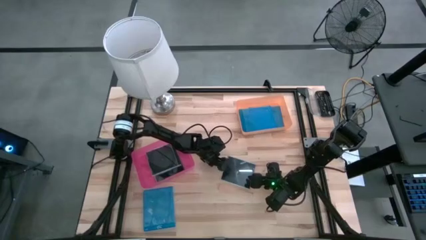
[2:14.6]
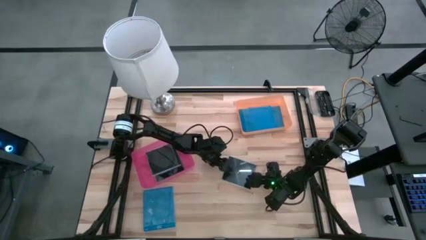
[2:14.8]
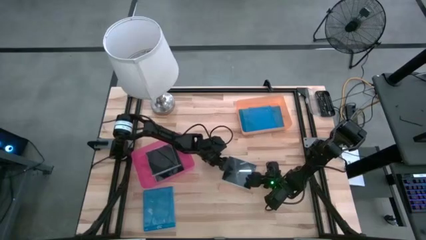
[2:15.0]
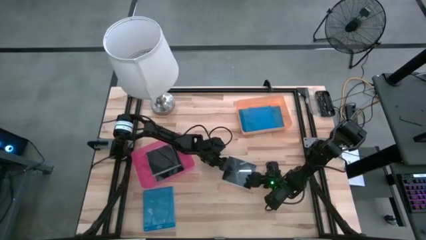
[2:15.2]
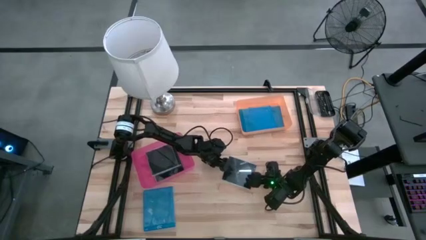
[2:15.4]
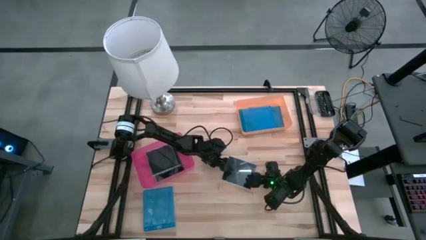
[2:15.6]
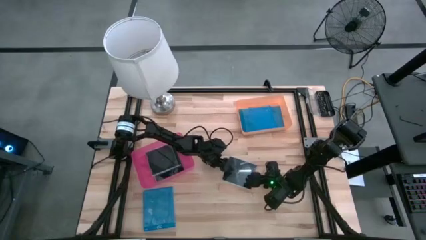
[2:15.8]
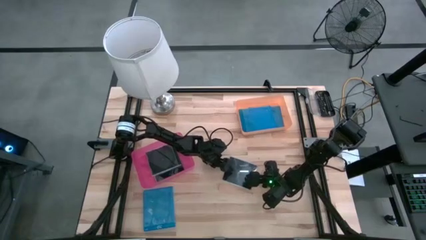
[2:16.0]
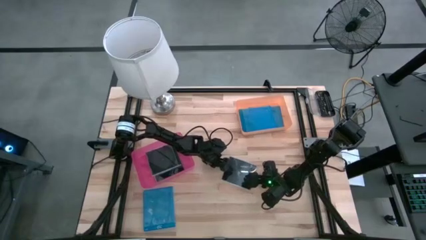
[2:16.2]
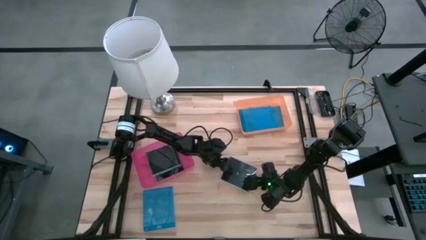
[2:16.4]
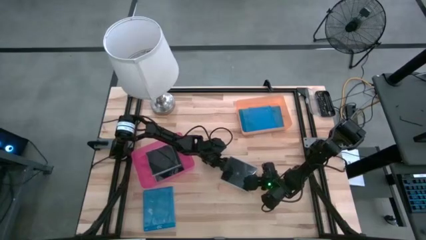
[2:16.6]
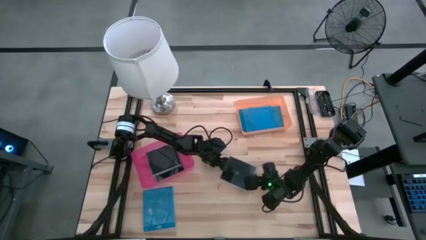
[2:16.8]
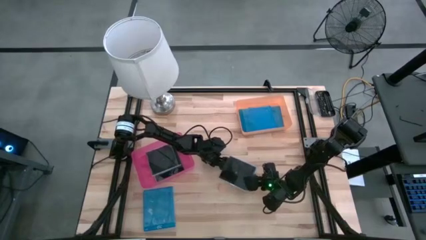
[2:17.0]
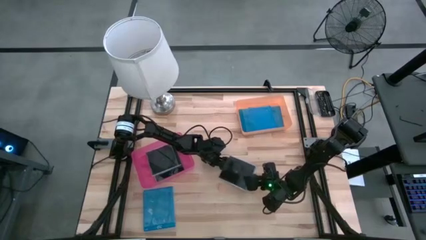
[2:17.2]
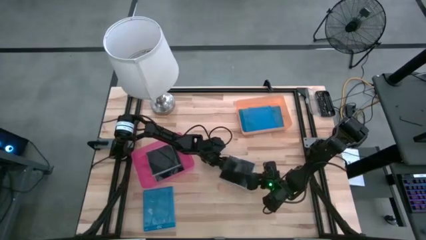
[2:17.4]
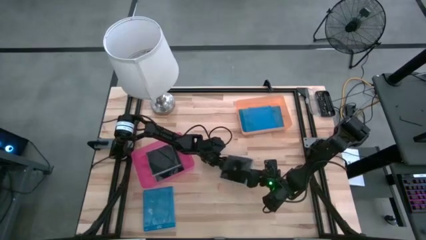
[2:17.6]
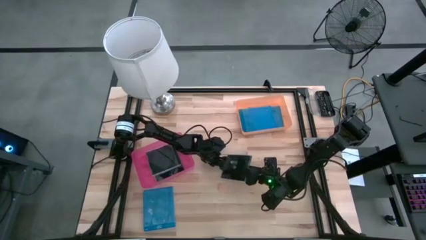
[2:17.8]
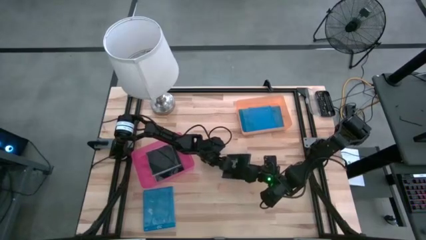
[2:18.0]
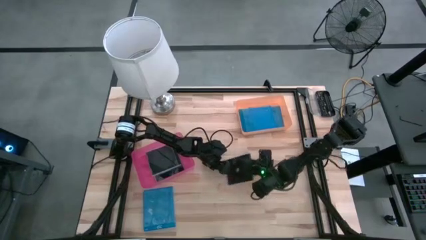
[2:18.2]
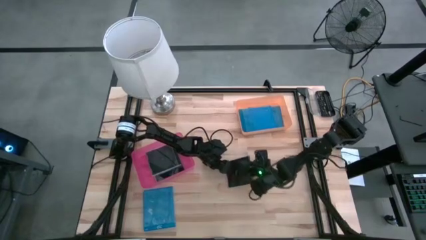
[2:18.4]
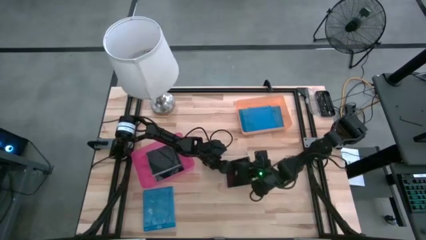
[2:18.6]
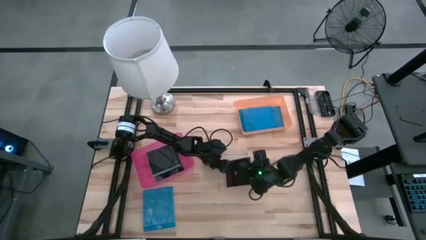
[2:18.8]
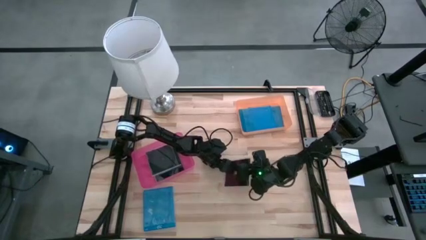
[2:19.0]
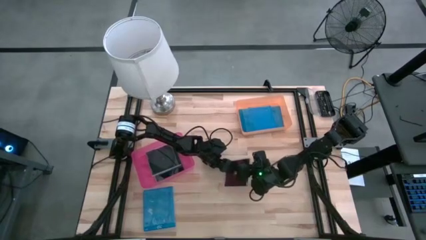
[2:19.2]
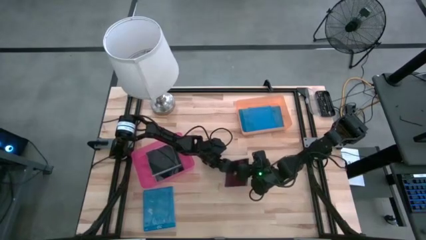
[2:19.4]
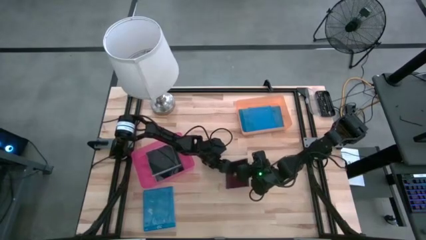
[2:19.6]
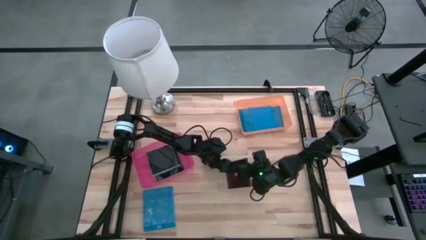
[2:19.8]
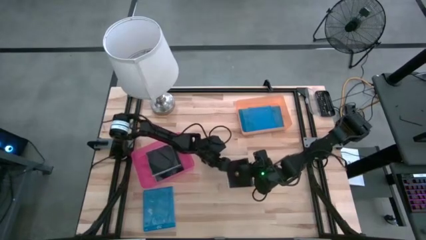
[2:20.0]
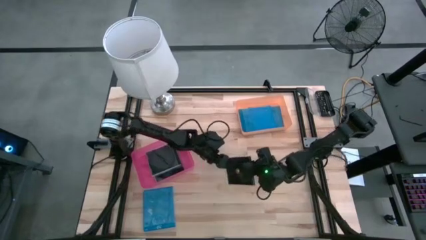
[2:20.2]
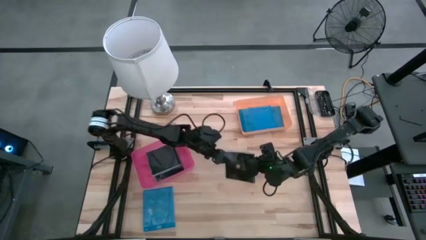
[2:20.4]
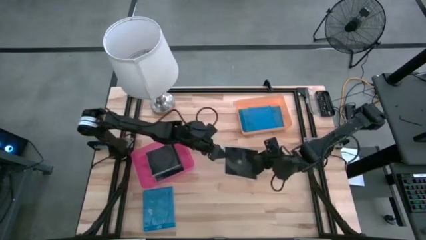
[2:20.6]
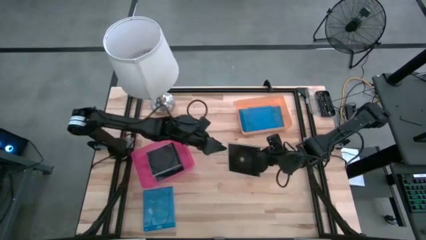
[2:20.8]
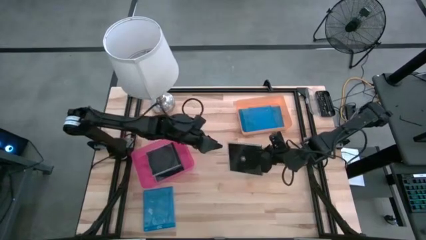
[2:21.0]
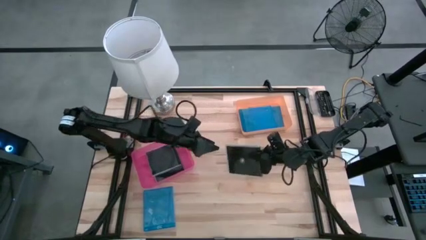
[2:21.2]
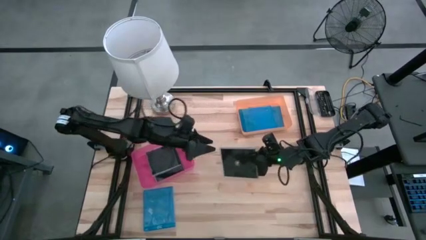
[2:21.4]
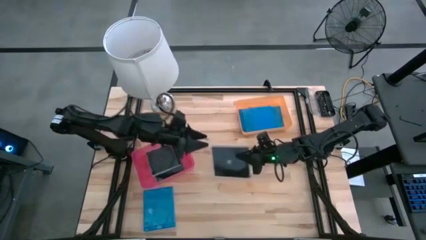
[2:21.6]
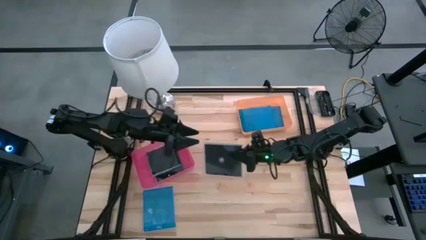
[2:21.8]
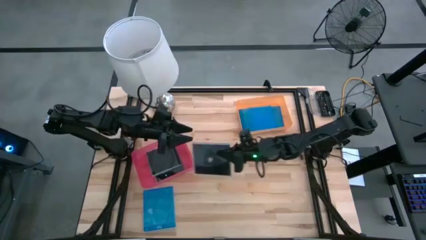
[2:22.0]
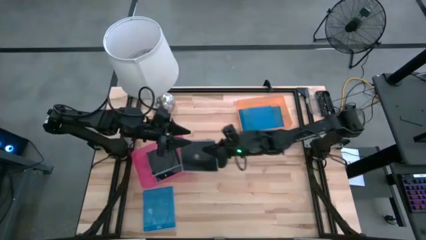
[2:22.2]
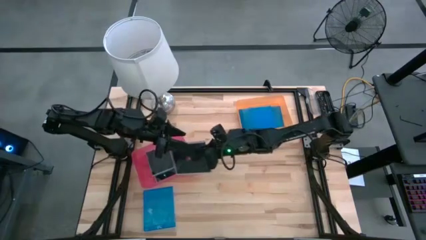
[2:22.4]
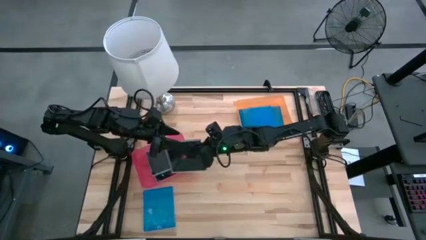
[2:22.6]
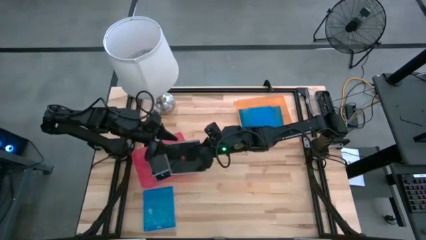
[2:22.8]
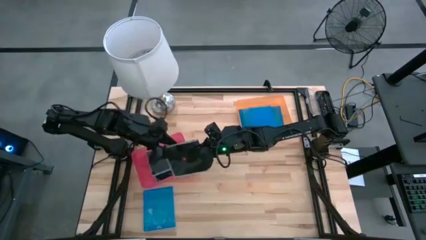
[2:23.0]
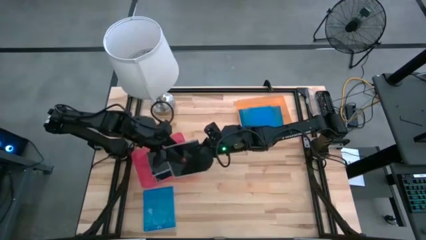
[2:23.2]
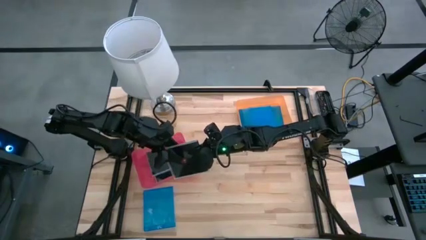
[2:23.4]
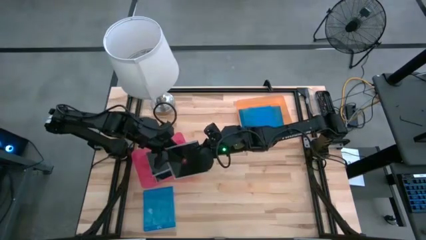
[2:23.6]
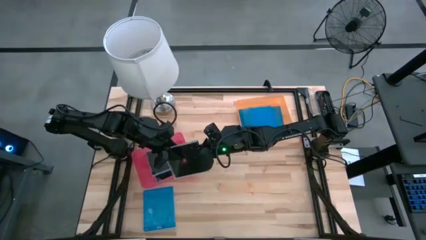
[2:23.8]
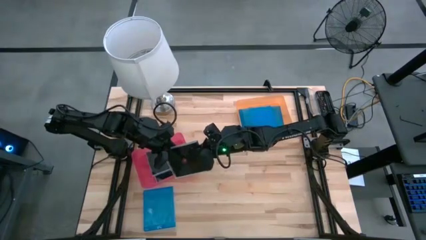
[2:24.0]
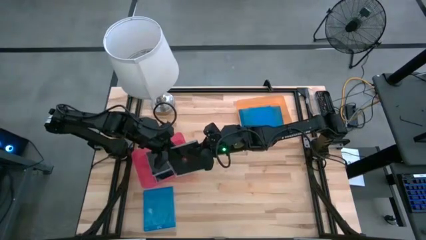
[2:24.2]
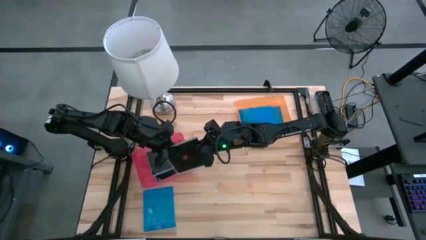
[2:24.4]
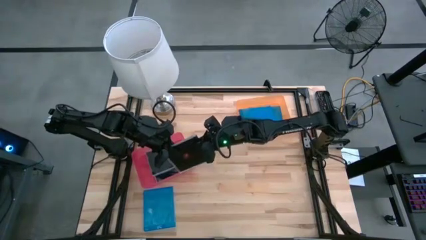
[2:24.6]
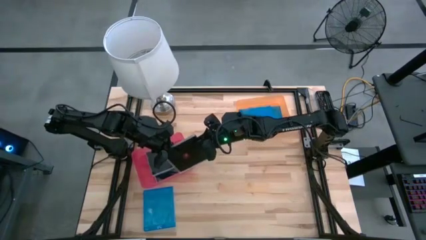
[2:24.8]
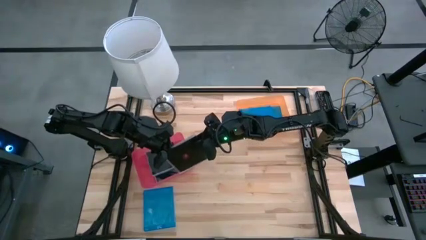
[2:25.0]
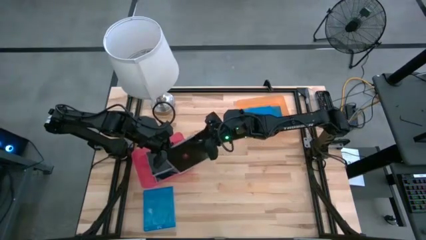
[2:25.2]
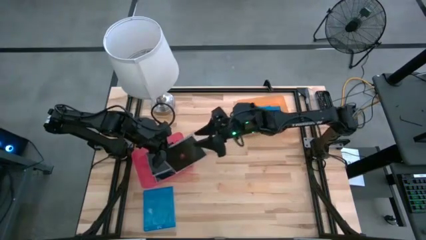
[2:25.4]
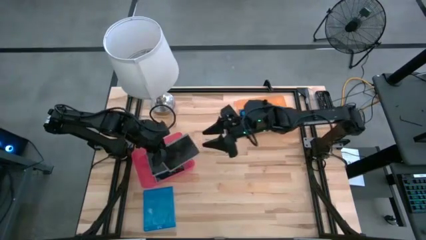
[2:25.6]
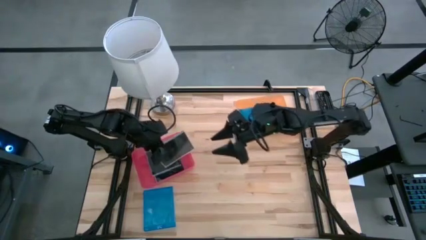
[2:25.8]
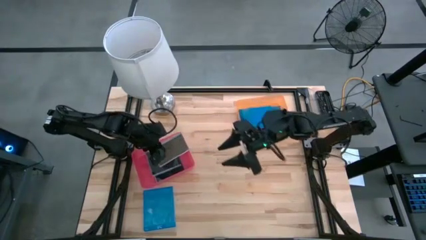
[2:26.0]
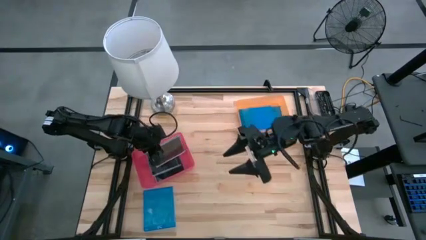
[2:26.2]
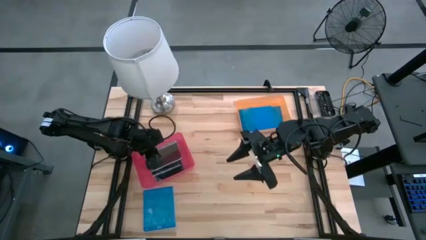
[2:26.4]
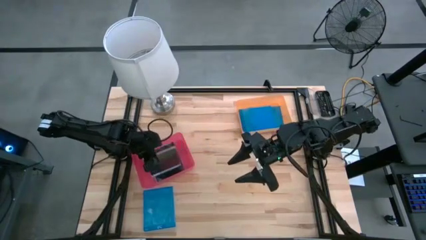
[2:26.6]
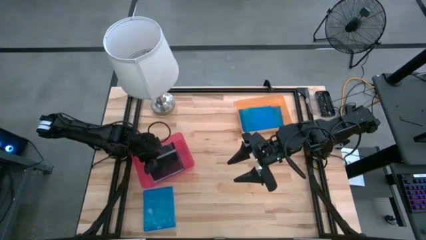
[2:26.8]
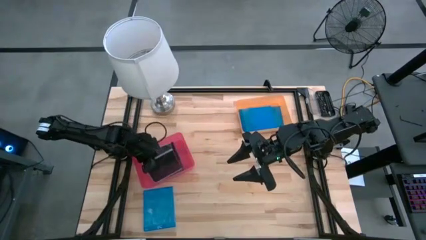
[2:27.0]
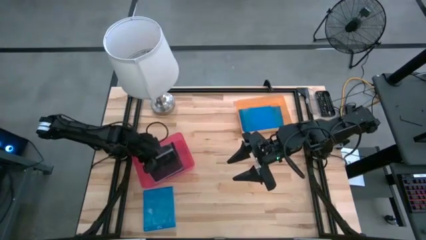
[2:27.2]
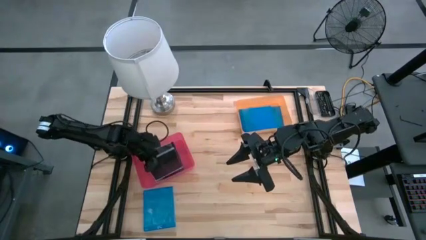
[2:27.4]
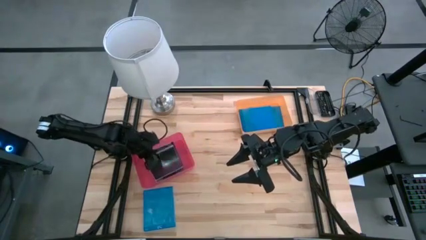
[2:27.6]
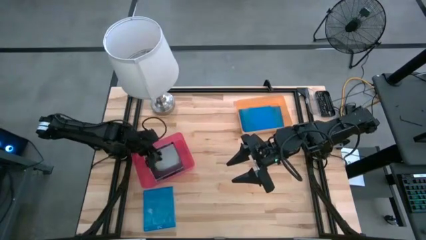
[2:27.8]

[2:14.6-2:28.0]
Task: Pick & place jewel cases by type
Put the black CD case into the pink bin
